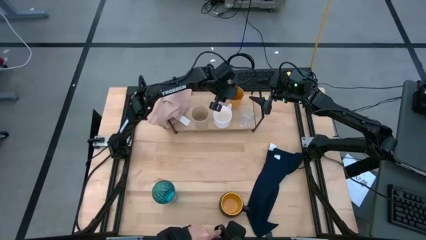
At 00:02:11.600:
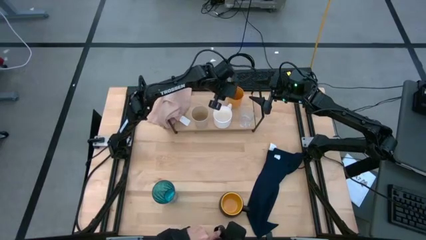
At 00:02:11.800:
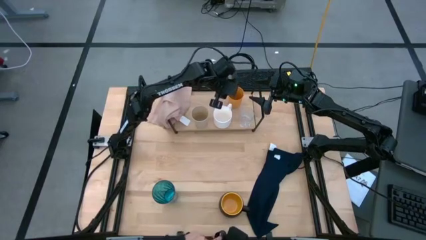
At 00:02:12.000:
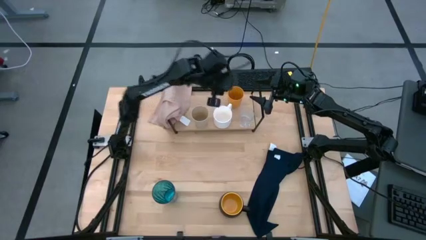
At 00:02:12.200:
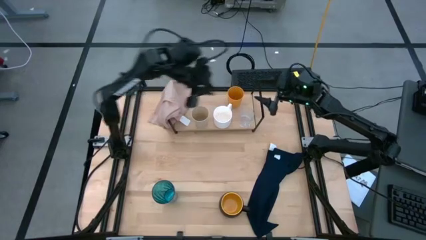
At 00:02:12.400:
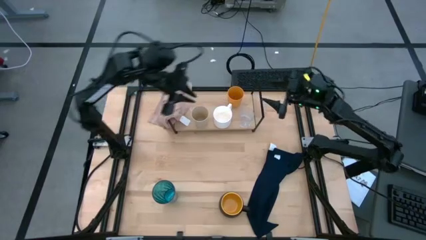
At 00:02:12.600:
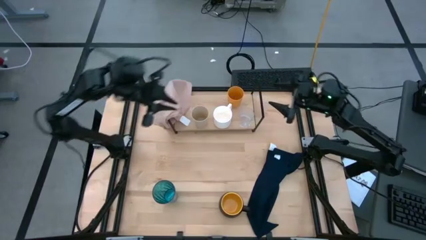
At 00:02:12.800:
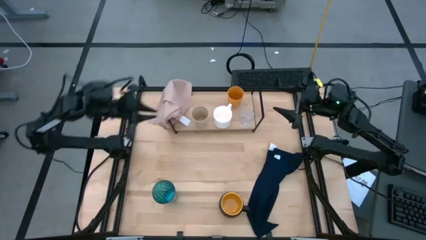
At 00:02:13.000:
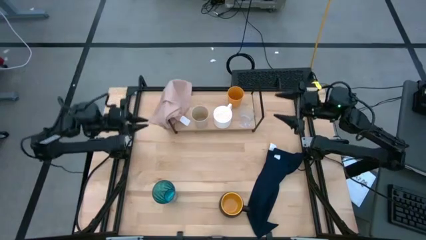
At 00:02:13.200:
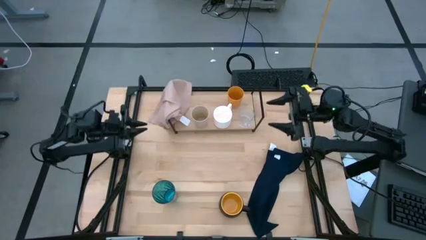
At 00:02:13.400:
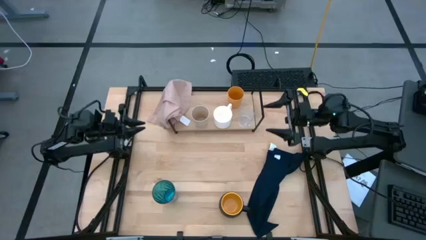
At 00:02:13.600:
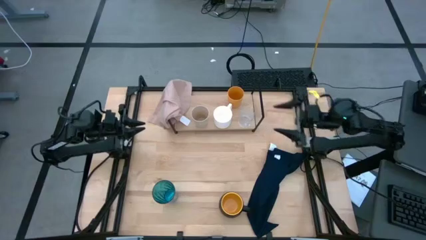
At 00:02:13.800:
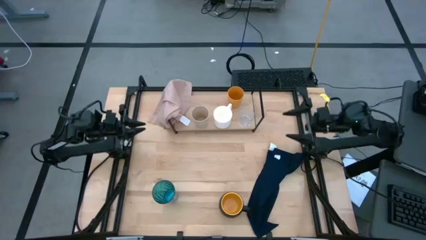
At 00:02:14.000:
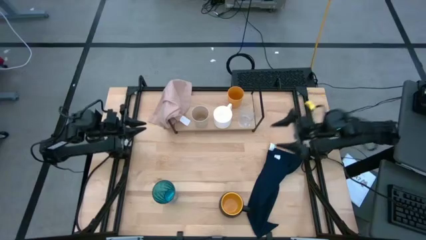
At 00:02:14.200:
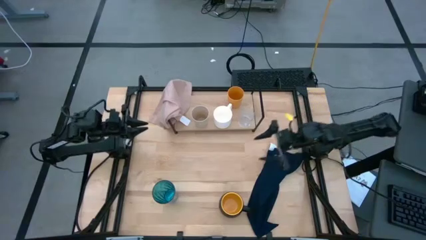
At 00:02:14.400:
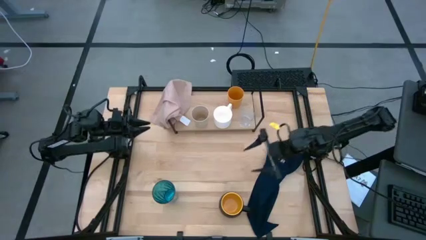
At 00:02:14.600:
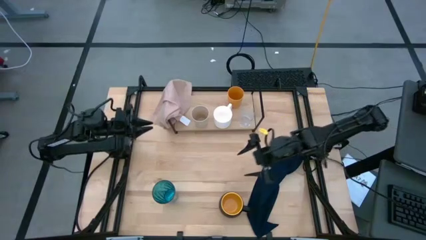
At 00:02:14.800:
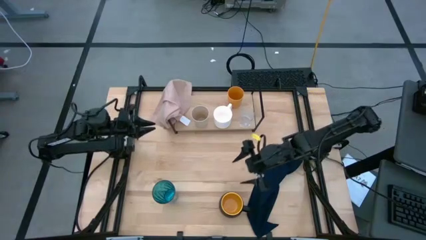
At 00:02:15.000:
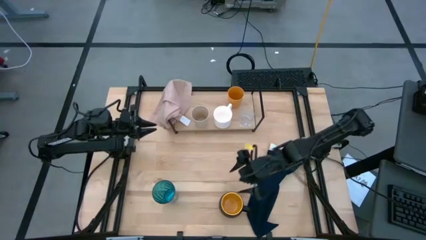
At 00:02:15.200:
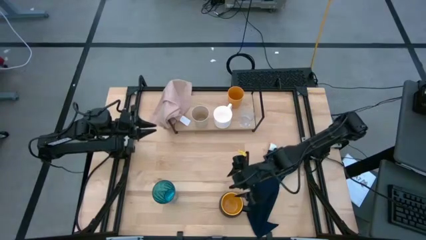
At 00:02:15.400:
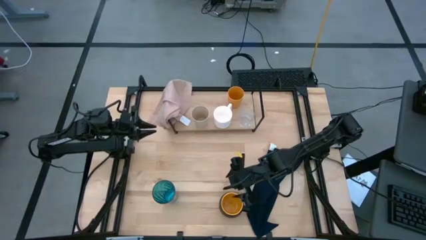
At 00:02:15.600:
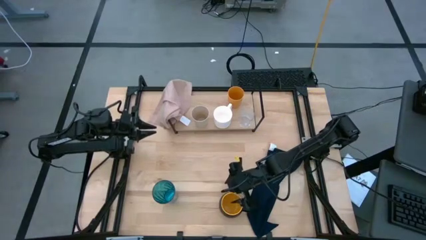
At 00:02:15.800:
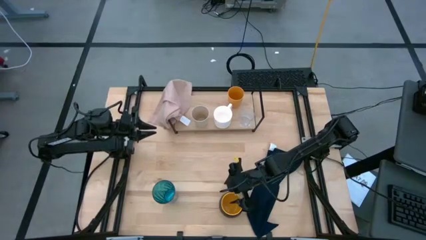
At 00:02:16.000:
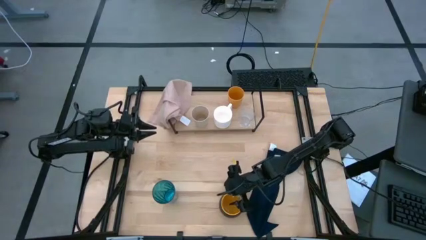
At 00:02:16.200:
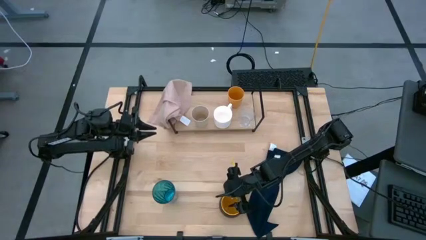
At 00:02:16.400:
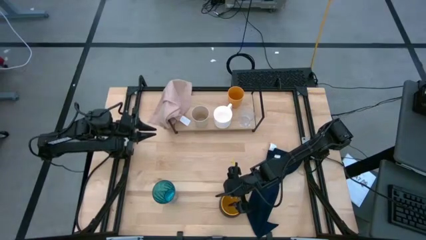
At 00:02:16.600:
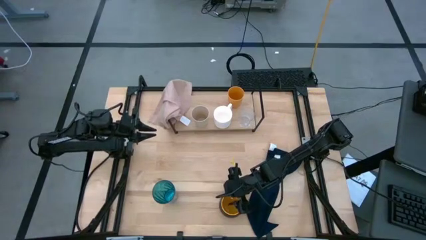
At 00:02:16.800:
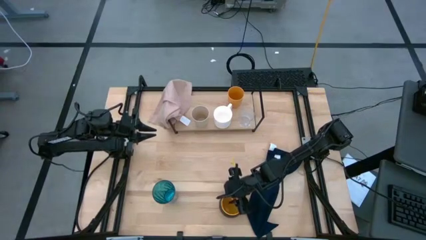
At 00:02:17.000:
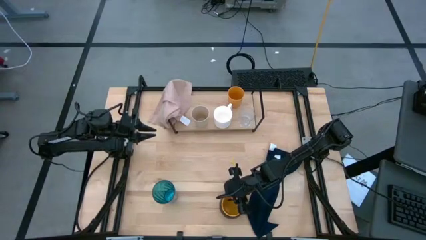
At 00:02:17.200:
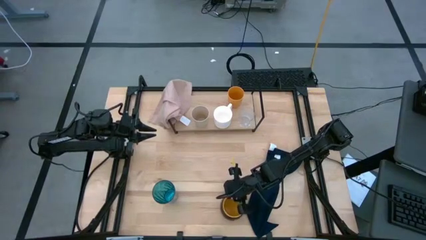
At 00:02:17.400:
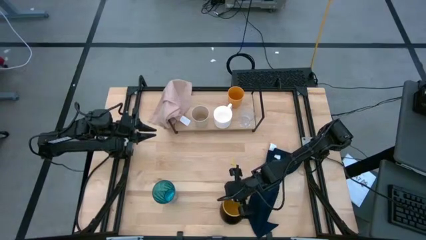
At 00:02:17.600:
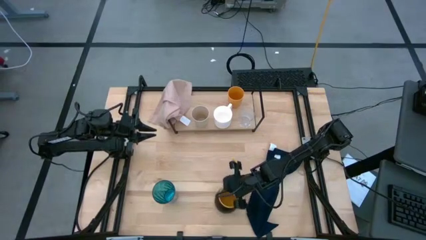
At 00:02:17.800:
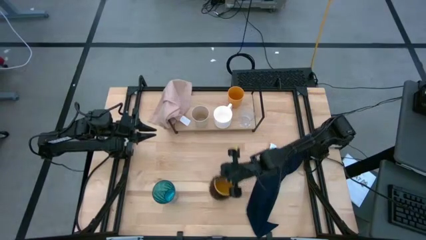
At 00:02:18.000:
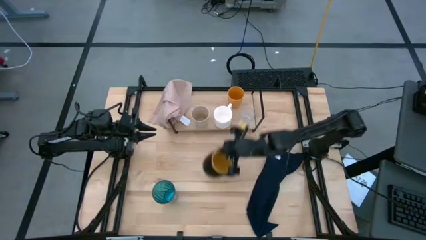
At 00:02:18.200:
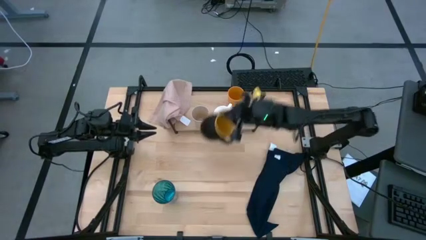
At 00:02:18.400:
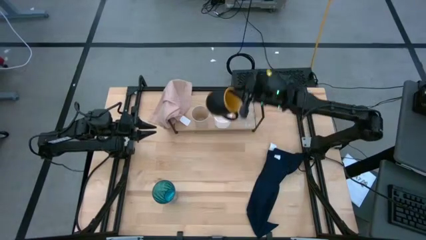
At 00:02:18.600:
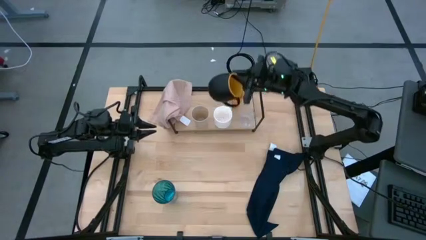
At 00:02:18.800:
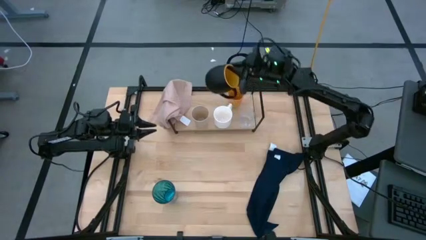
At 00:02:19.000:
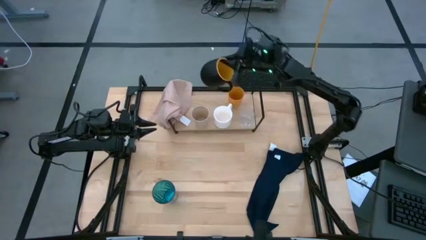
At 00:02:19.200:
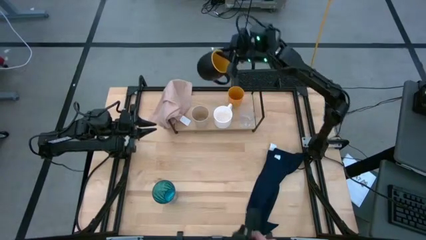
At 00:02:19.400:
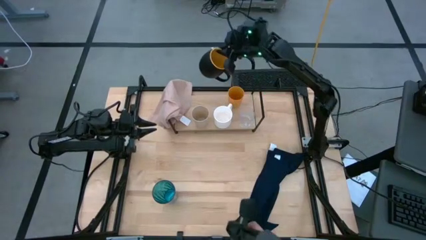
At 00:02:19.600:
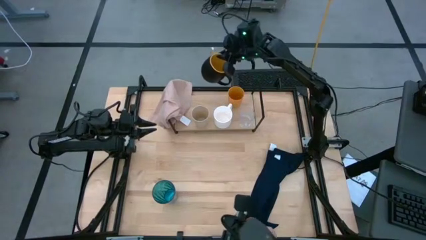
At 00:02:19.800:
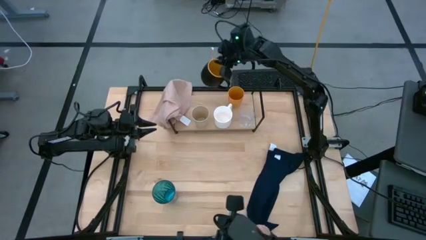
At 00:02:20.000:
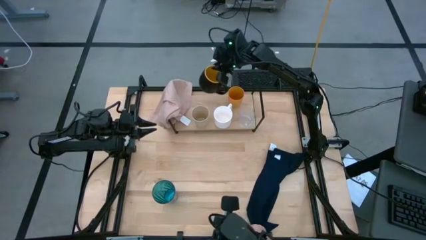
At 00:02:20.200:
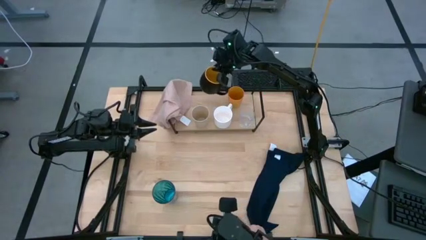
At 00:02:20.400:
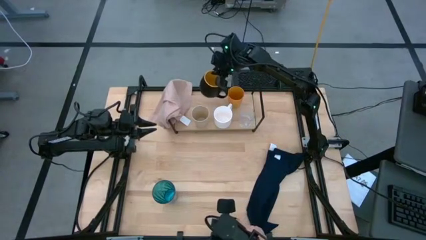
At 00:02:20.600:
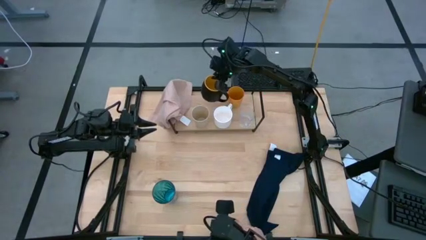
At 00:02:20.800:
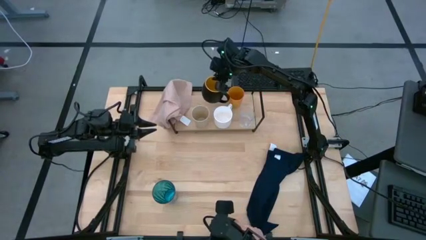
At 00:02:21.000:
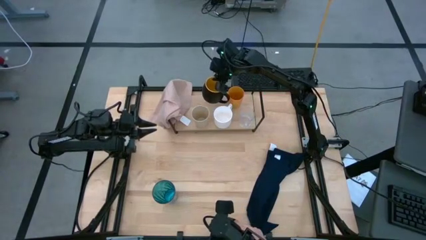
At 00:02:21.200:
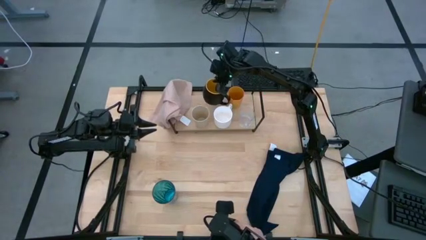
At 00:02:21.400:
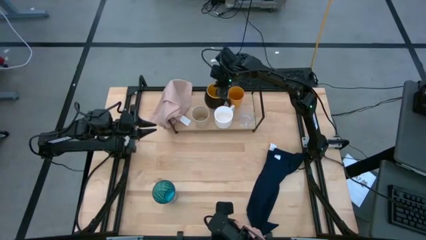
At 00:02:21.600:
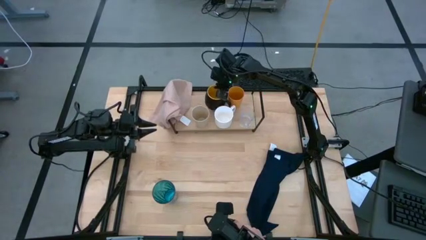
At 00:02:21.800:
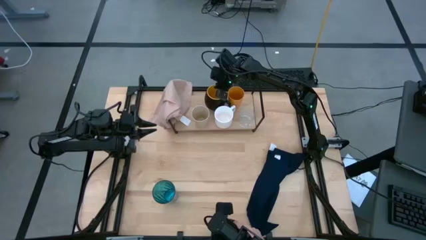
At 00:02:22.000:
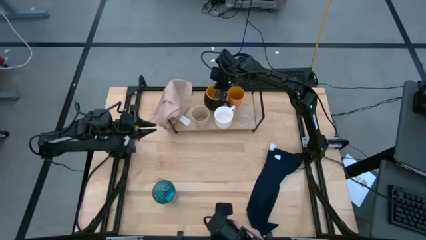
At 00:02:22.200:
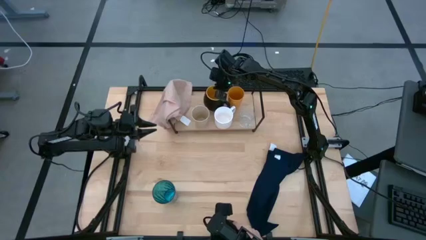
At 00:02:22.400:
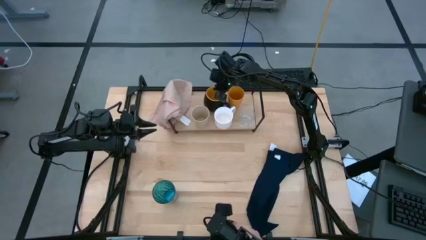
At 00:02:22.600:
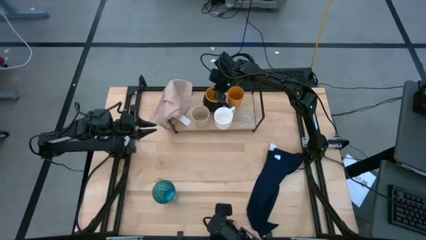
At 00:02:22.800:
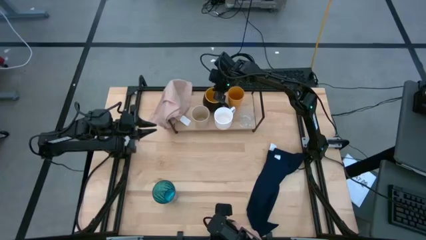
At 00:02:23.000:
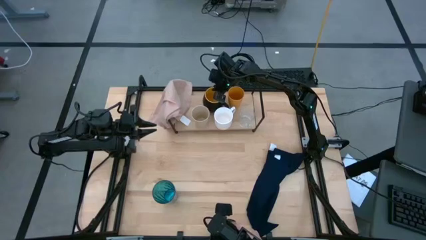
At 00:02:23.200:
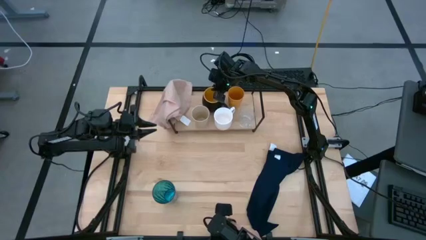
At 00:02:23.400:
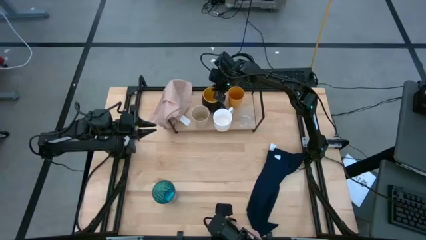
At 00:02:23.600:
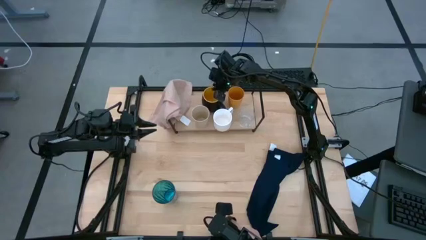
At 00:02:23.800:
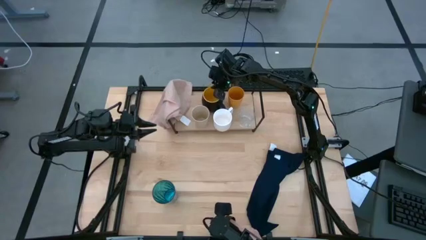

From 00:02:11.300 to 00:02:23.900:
Task: Stack small to large cups/mugs on shelf
Put the black mug on the shelf
